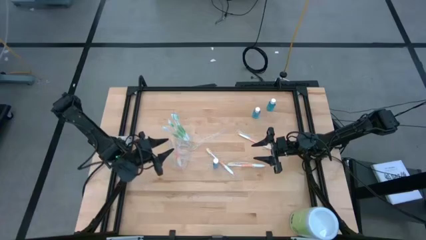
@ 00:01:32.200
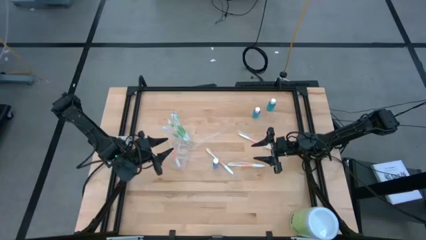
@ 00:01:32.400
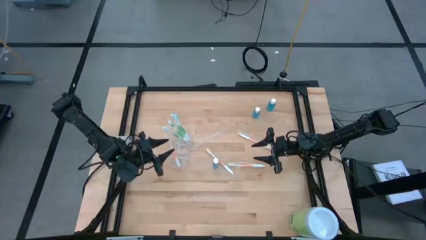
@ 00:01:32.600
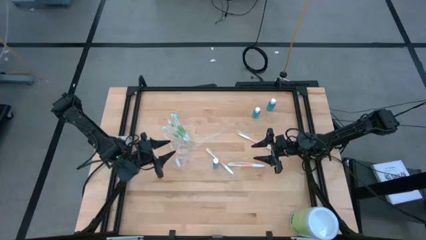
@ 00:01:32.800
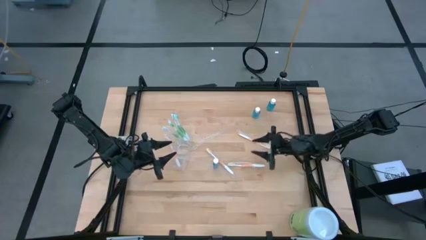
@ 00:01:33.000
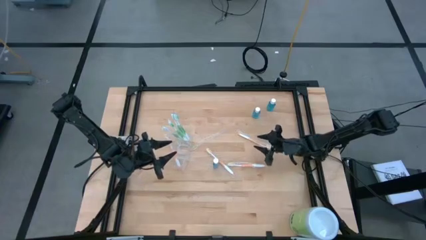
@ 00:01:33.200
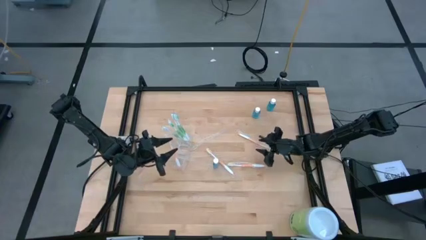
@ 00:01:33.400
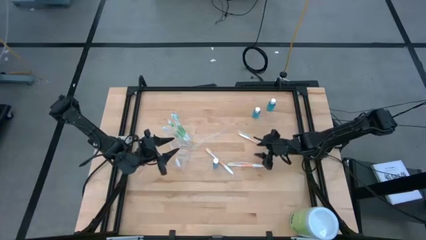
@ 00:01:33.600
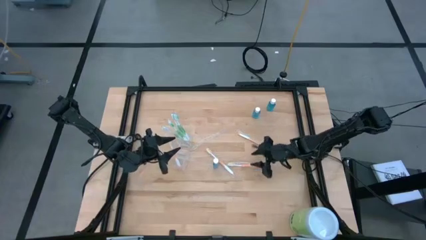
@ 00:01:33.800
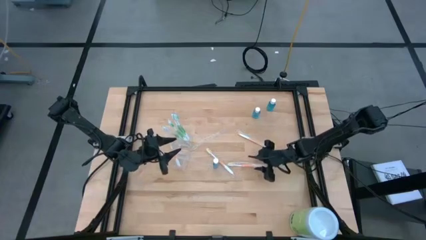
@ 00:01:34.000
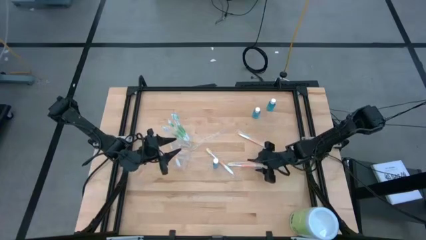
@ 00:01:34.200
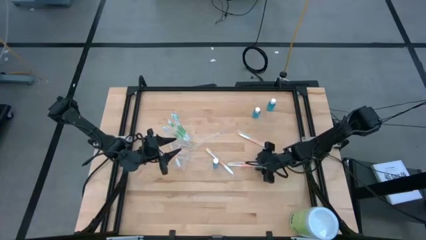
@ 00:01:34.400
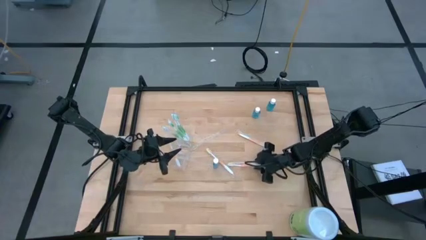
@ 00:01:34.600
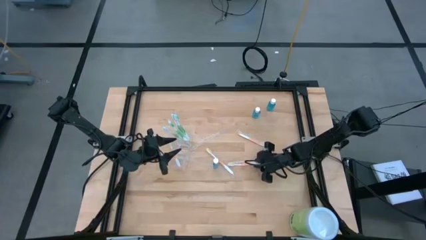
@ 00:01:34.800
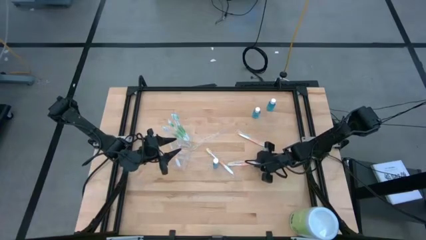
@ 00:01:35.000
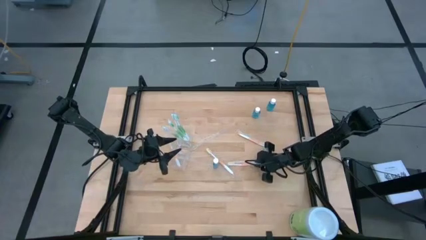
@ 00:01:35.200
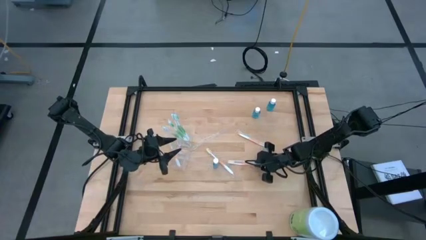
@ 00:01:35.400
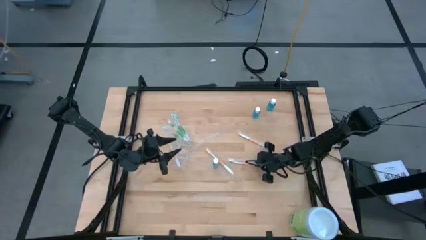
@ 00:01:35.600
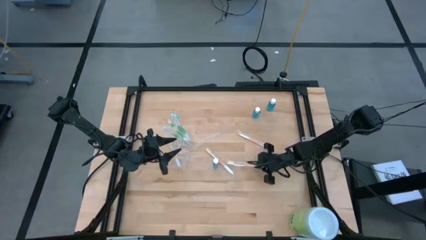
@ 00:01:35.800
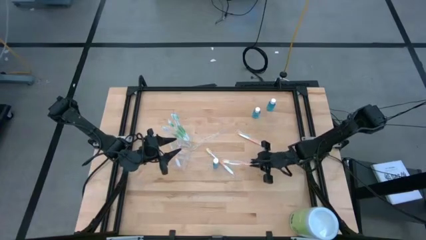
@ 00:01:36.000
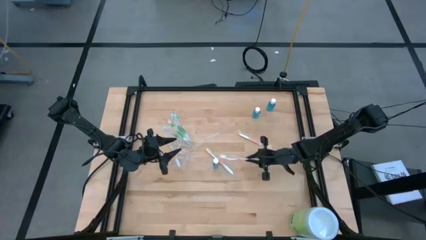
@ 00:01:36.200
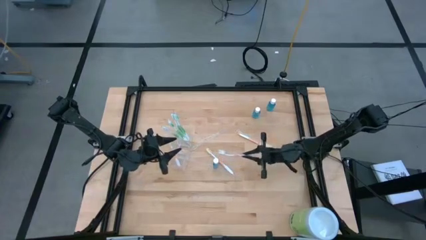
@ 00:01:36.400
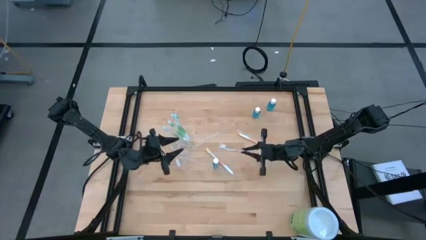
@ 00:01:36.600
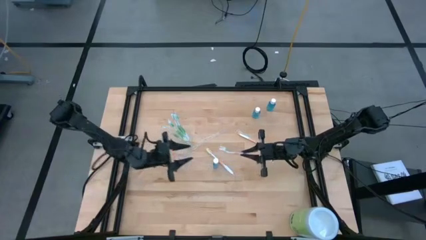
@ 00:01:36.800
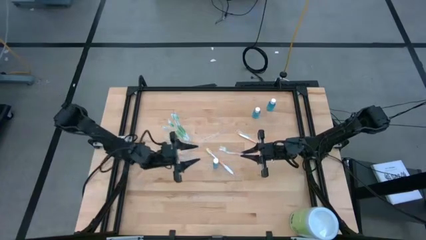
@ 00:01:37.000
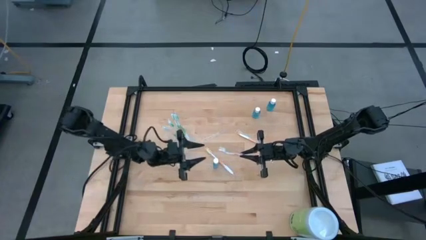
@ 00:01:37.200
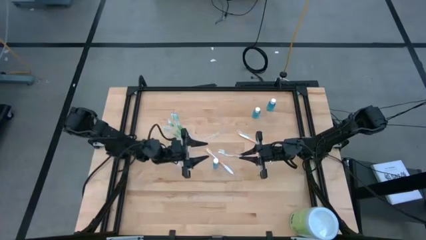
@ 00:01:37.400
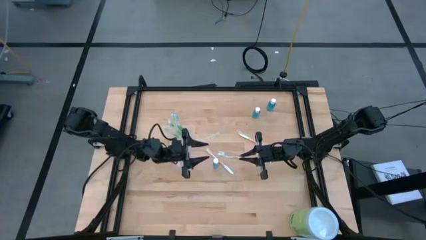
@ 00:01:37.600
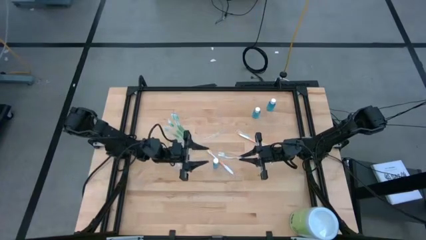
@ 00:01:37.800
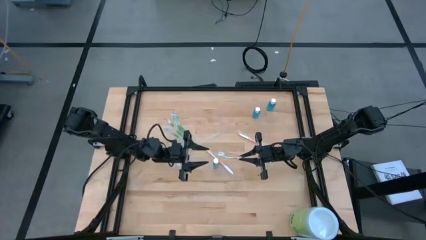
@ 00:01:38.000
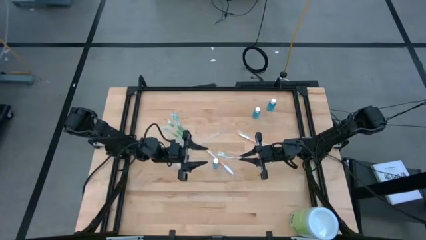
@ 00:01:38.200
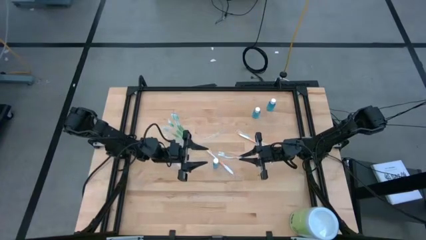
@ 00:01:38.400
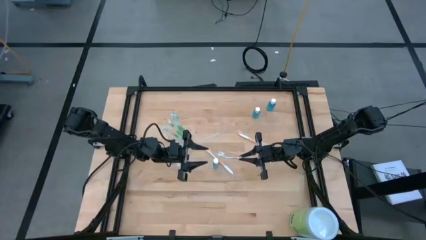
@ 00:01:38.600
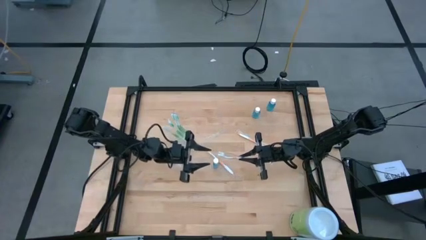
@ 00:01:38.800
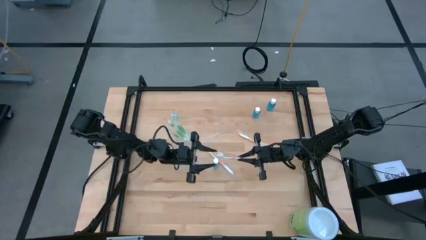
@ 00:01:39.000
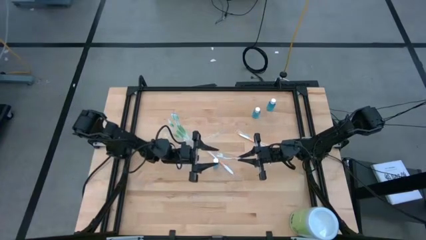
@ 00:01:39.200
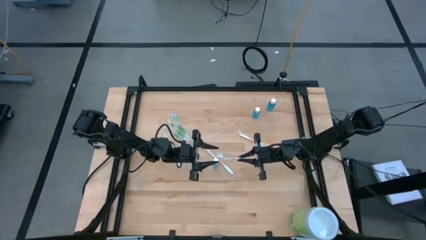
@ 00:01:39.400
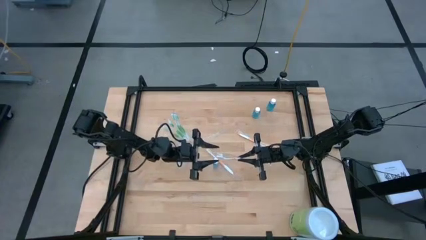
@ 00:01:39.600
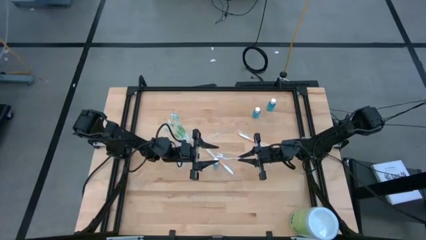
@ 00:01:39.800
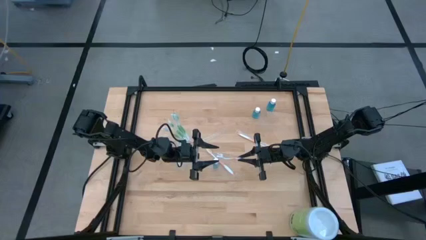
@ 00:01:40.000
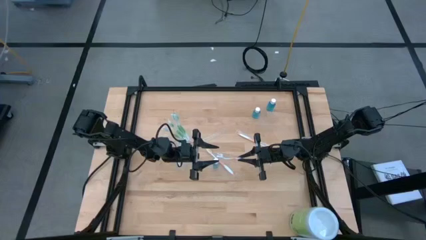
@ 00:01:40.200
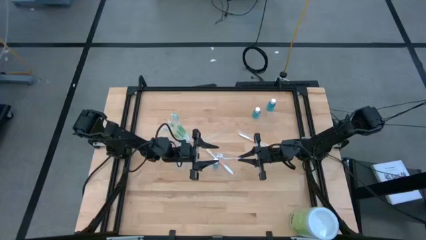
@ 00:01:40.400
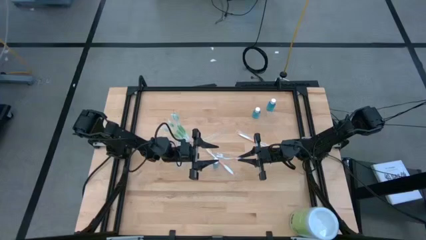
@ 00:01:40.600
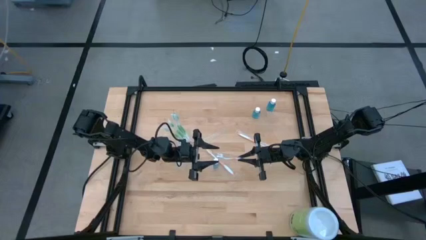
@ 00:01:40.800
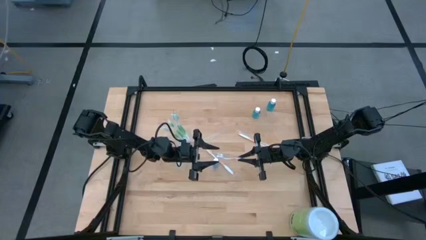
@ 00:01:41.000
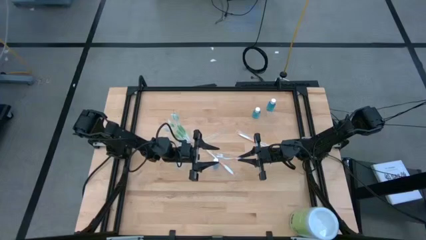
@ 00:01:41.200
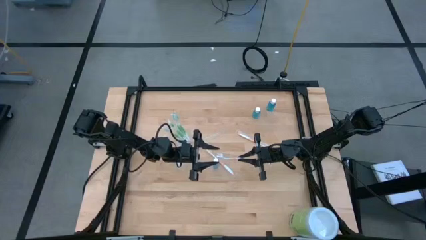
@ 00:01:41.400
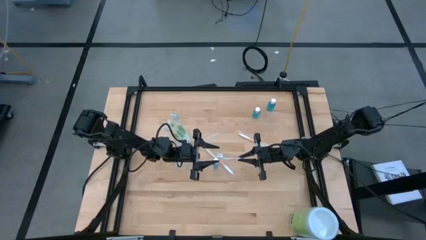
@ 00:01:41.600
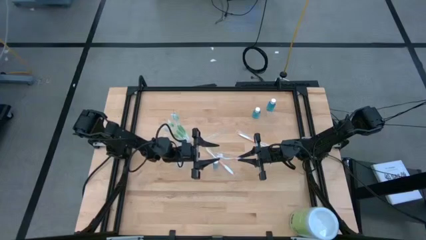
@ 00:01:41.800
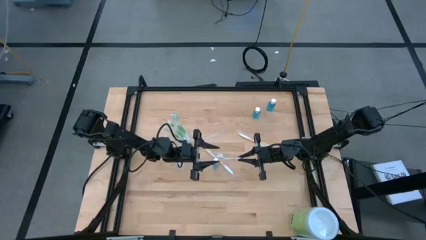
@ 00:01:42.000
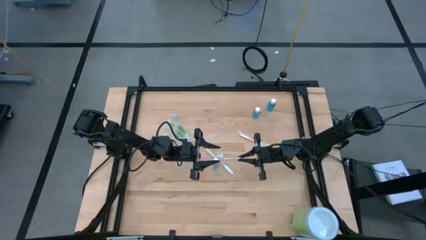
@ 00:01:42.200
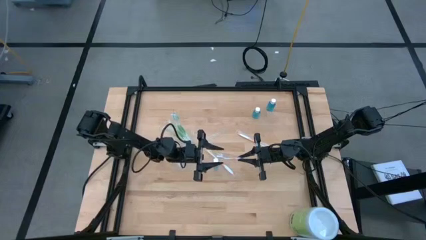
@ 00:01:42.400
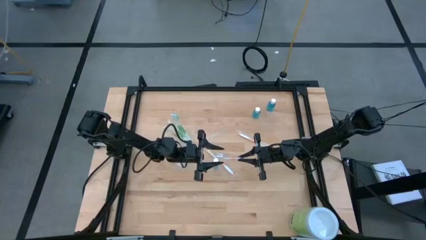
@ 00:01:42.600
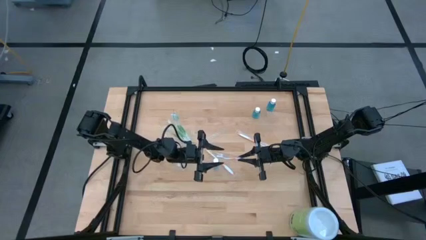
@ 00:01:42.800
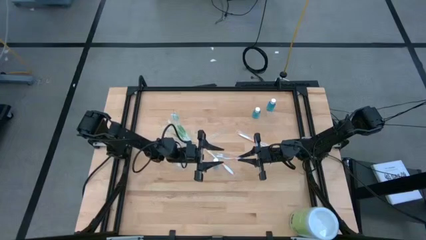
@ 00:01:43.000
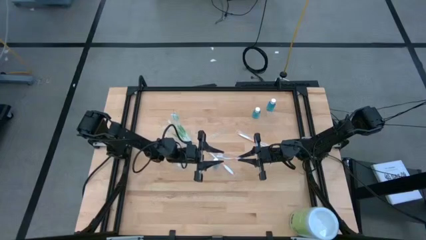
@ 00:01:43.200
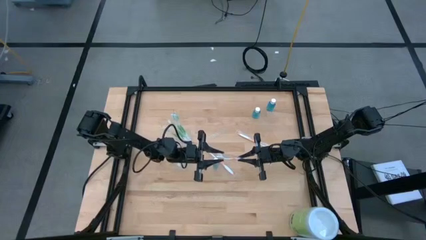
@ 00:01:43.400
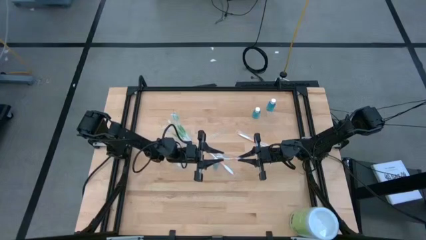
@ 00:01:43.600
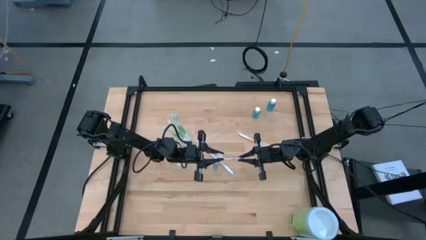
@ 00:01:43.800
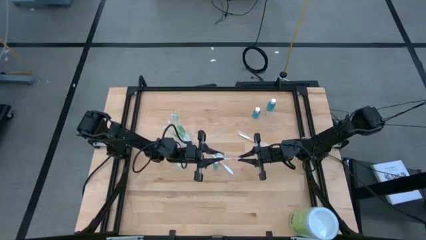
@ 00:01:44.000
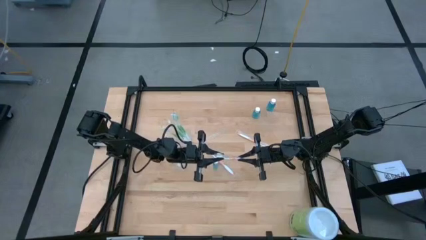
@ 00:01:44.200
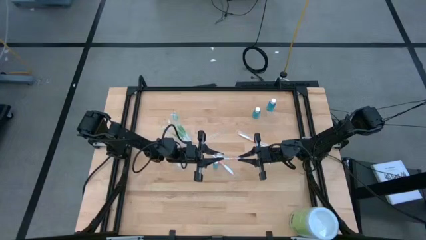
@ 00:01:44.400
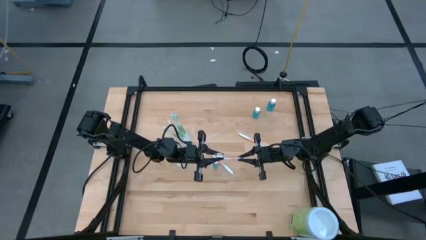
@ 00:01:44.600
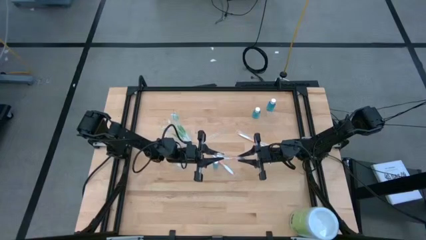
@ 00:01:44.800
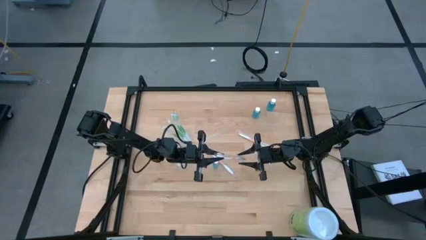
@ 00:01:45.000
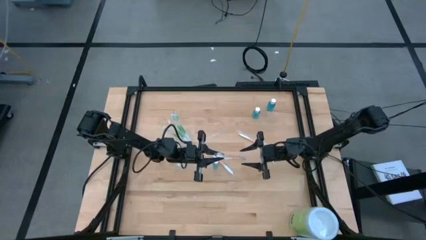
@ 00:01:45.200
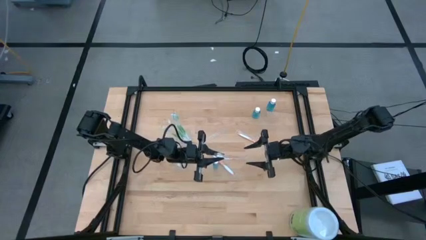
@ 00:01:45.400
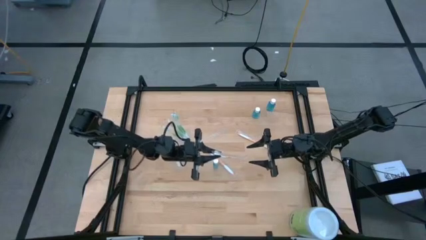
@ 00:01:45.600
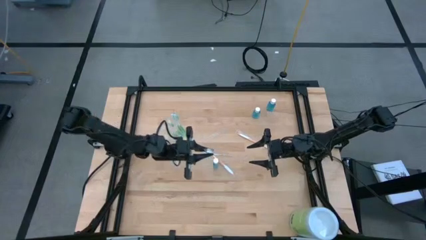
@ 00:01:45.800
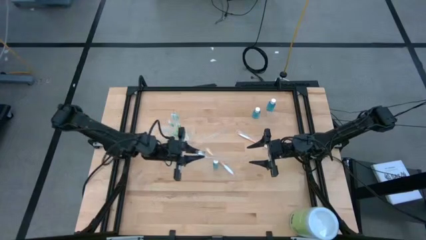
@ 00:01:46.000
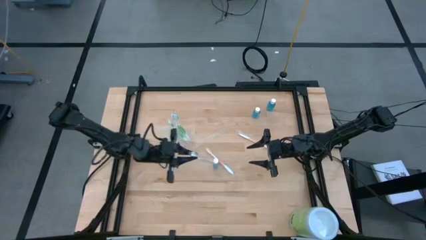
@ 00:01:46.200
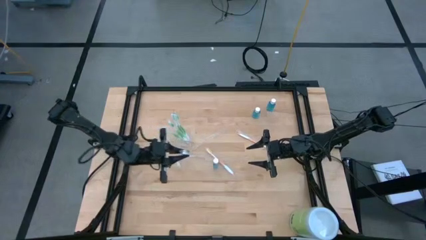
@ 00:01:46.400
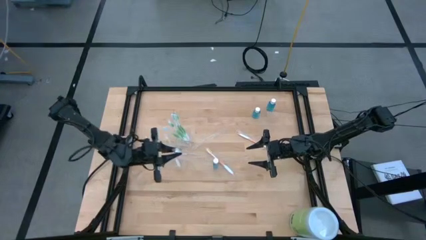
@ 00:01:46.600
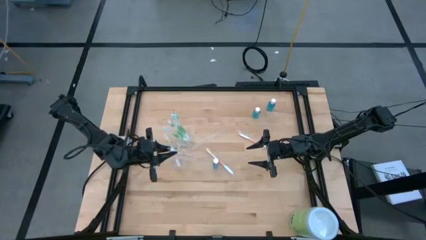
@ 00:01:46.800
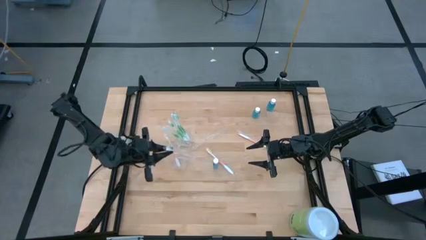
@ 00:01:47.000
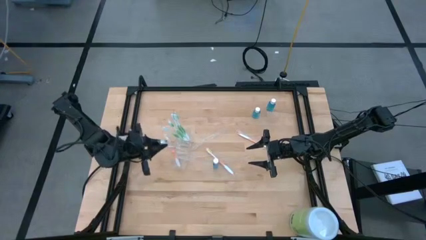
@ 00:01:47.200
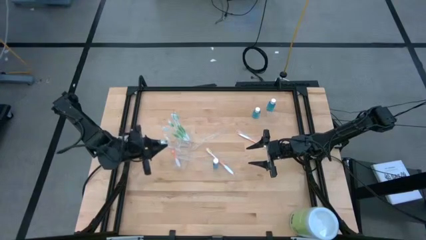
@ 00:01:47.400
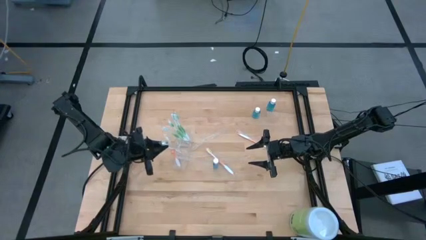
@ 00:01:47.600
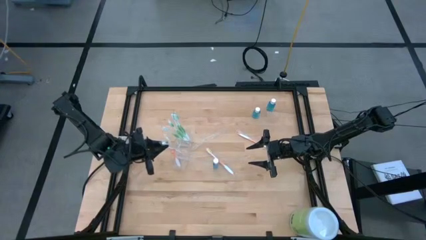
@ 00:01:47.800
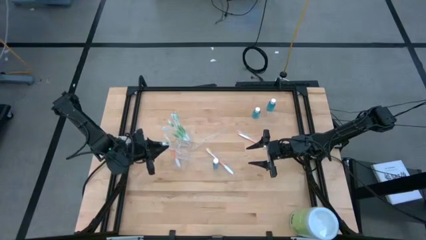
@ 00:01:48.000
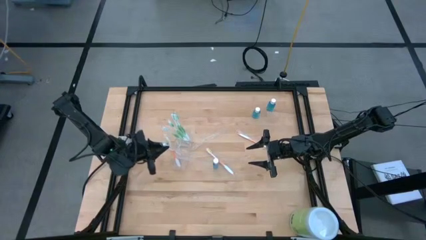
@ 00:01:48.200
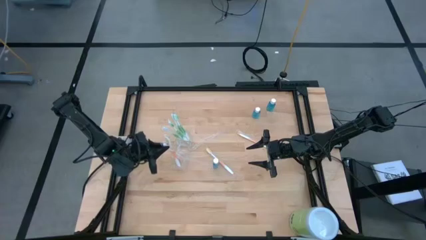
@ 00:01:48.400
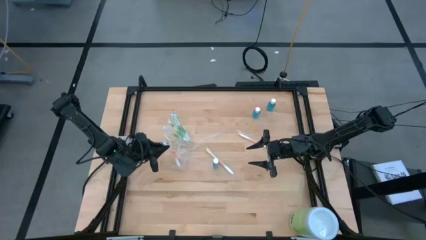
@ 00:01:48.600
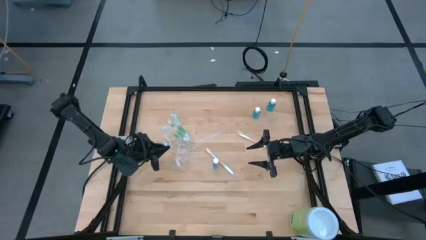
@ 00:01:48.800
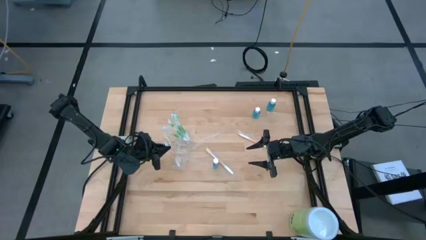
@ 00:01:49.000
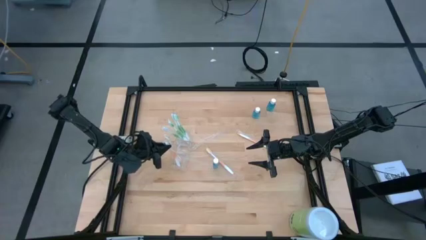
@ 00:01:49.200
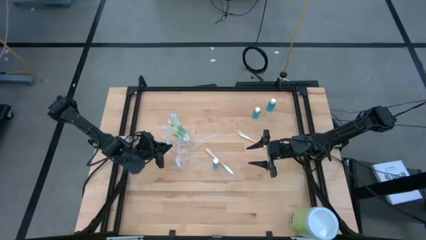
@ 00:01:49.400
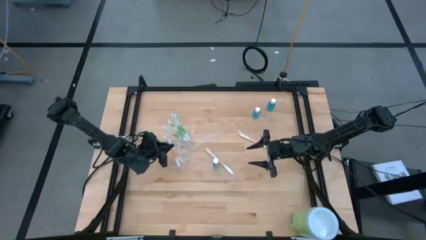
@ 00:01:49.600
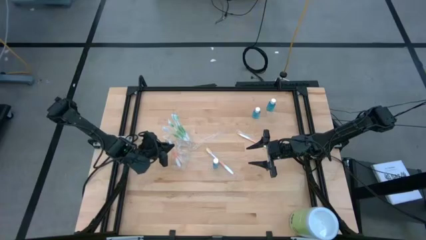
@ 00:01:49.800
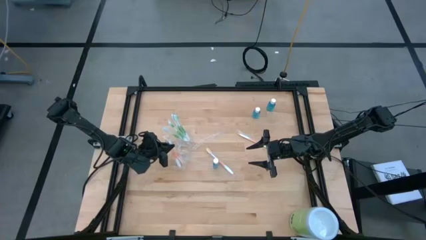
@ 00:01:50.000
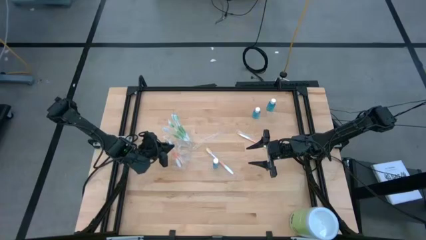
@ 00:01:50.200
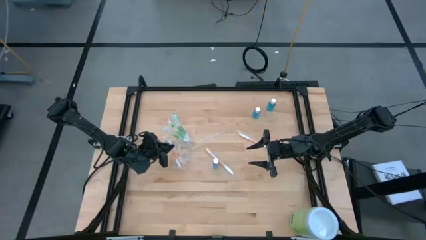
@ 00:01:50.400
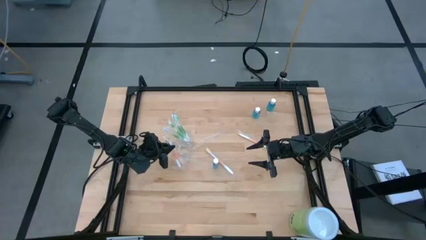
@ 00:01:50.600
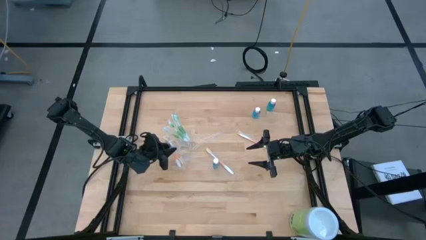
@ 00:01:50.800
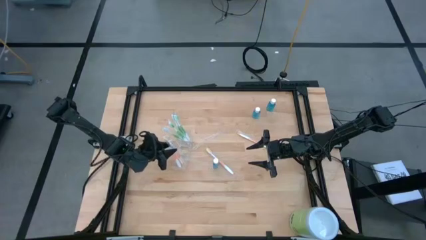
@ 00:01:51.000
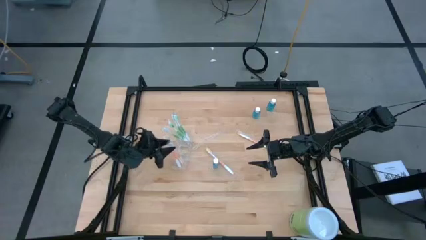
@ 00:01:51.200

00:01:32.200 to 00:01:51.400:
Task: Pick & Place toothbrushing station
Put the orange toothbrush into the bottom section of the transparent organizer
